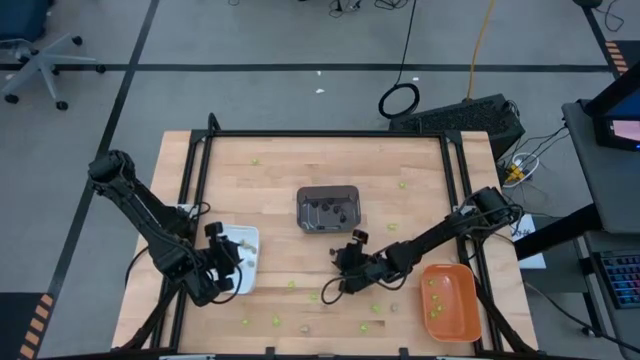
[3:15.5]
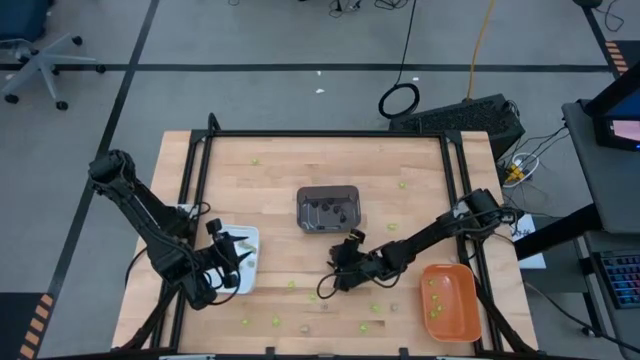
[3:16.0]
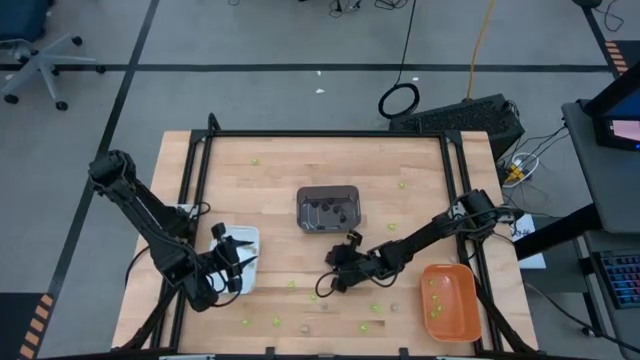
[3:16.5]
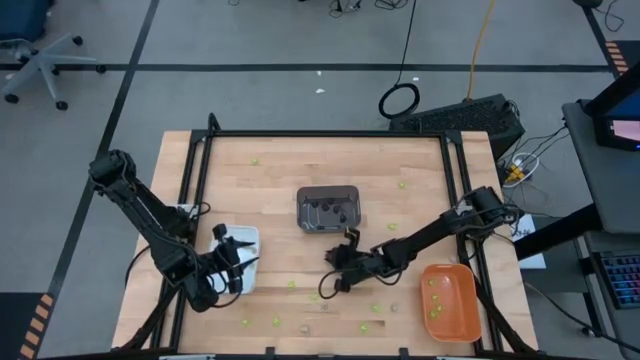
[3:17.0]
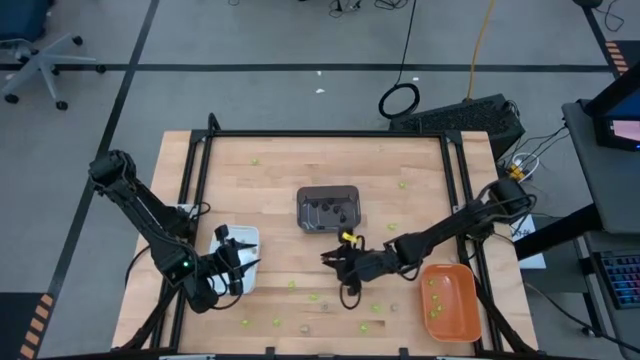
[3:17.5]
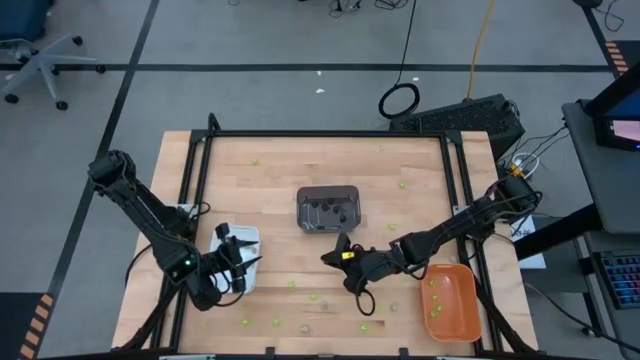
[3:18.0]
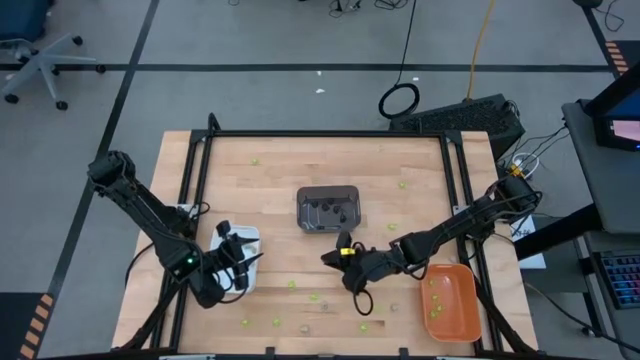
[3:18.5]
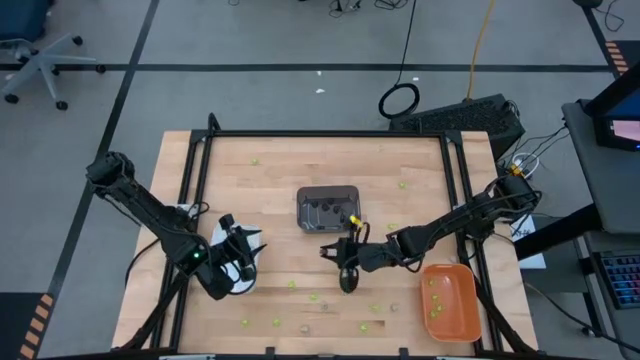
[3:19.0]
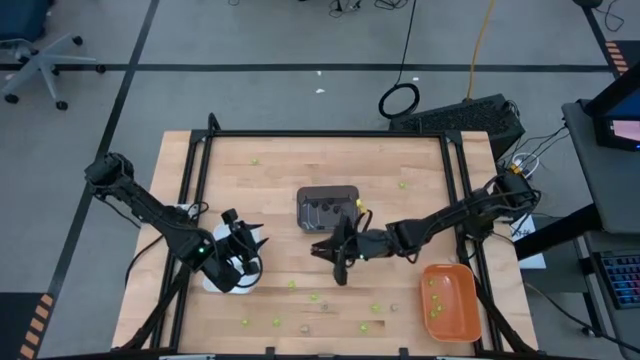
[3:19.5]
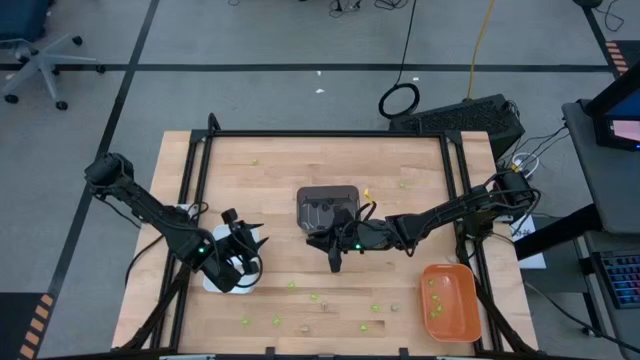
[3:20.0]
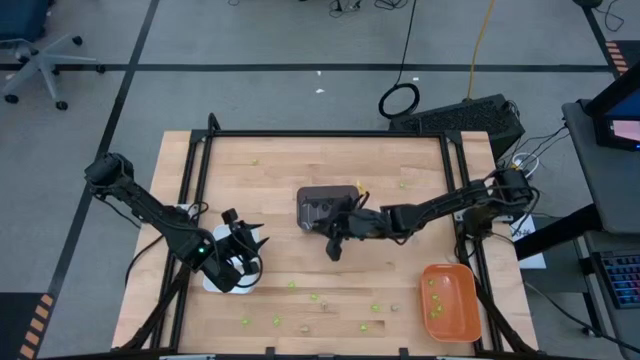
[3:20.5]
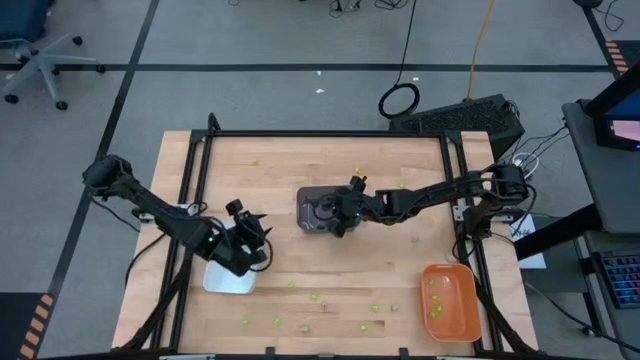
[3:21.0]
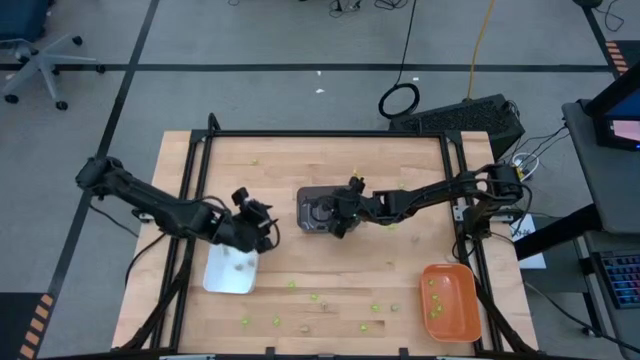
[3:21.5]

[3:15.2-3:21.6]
Task: Sort Halloween decoration
Put the black skull toy into the black bin

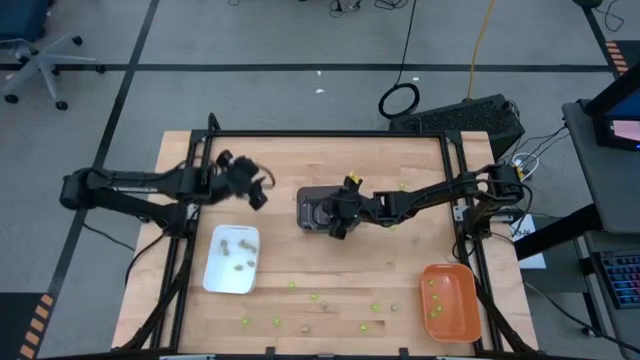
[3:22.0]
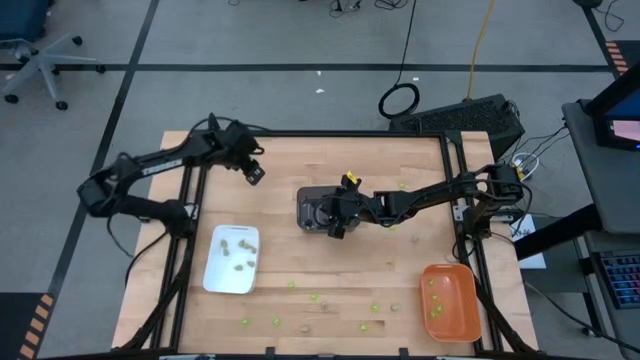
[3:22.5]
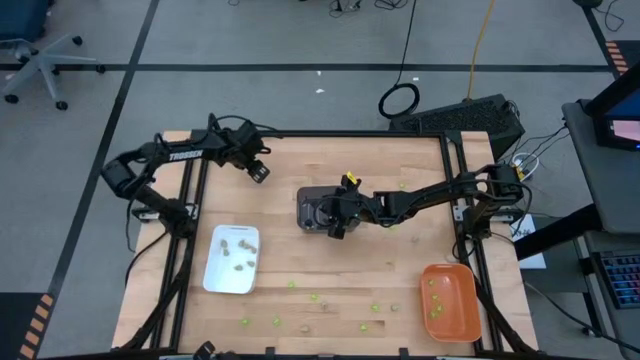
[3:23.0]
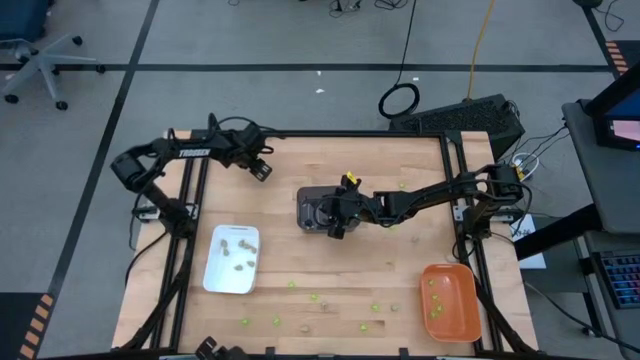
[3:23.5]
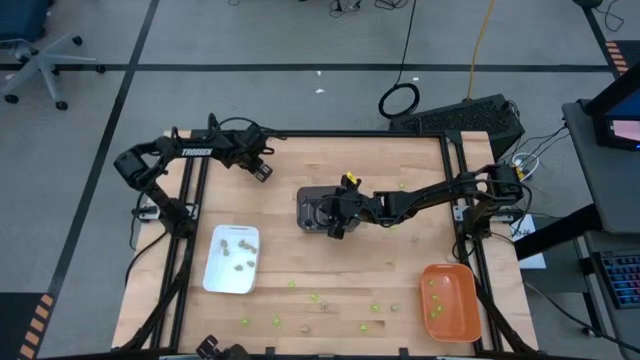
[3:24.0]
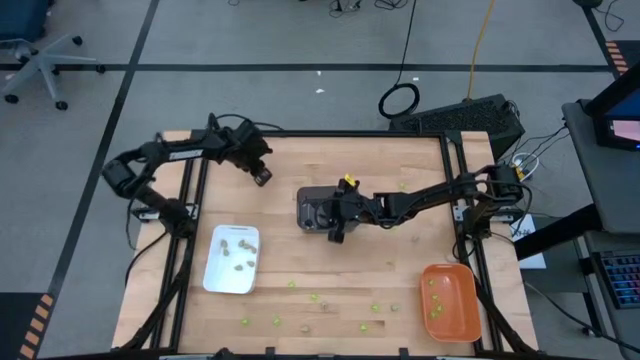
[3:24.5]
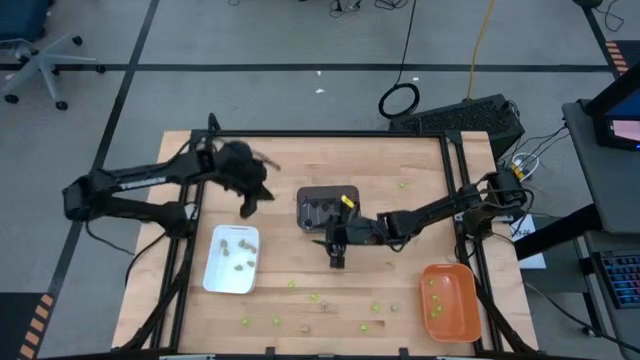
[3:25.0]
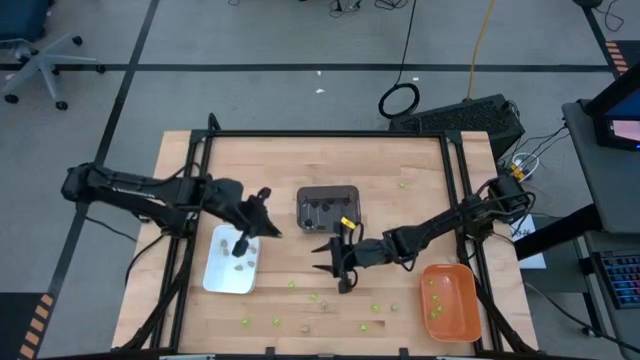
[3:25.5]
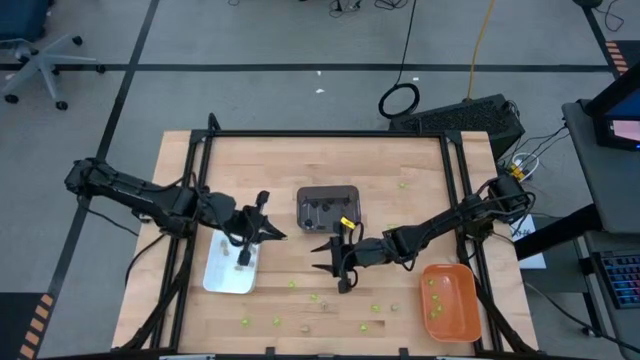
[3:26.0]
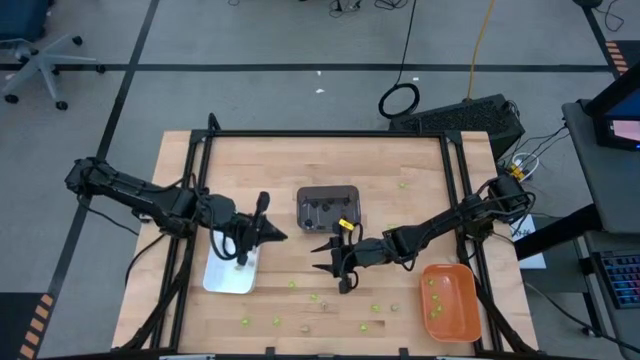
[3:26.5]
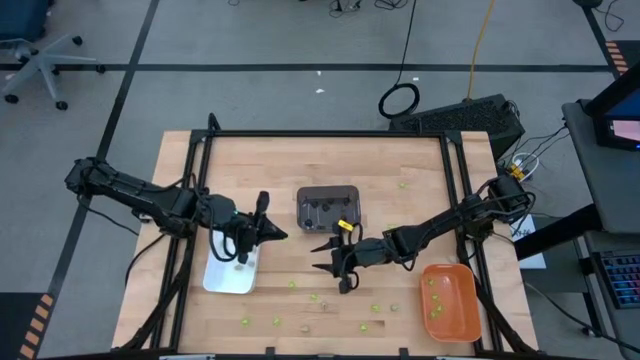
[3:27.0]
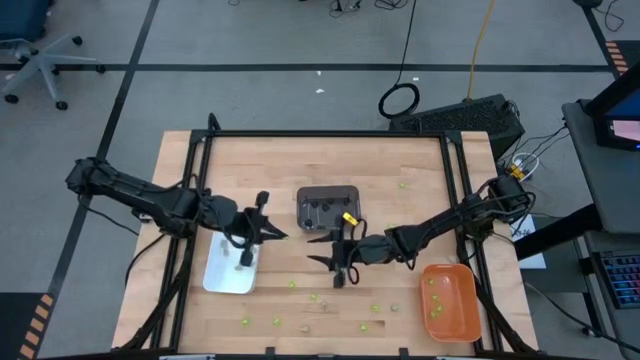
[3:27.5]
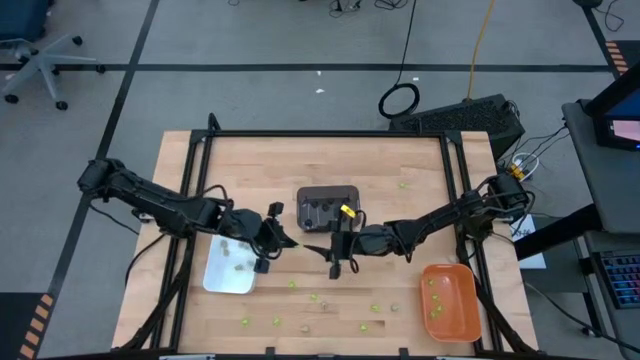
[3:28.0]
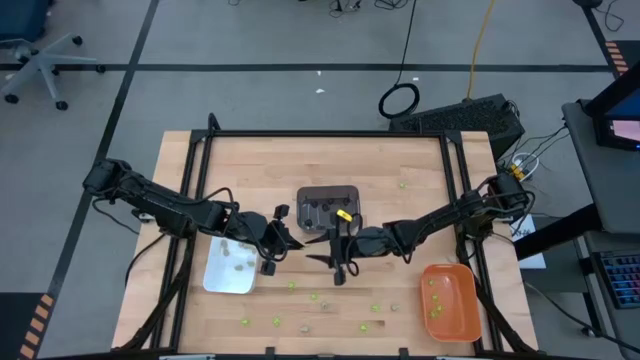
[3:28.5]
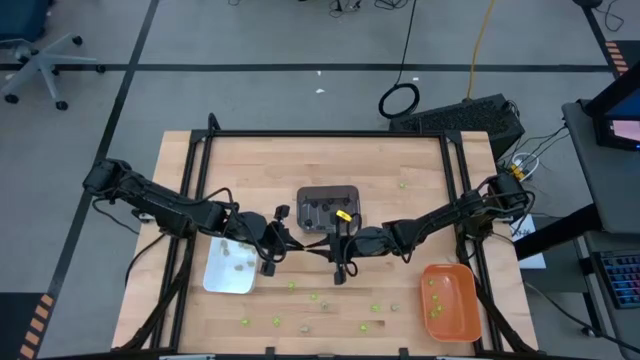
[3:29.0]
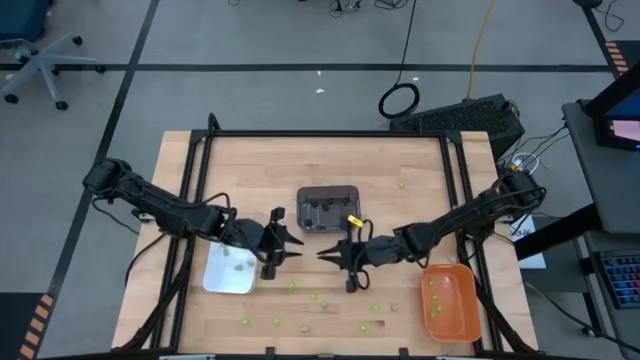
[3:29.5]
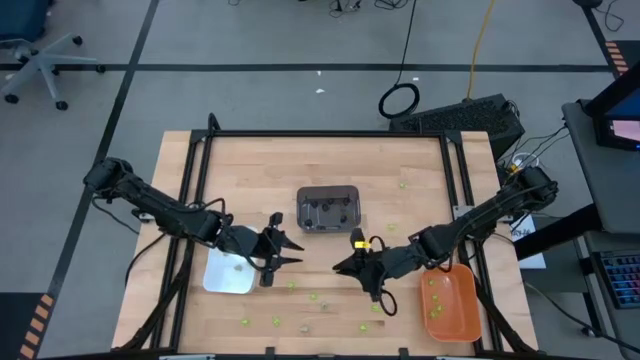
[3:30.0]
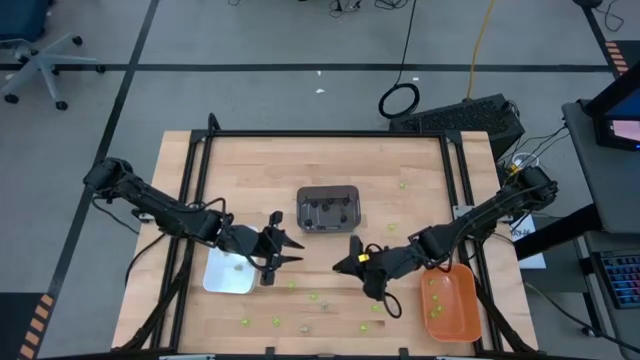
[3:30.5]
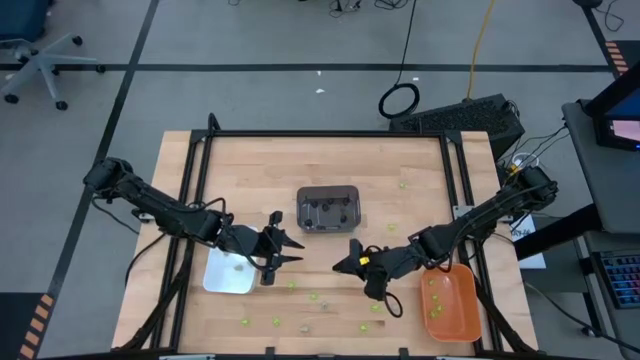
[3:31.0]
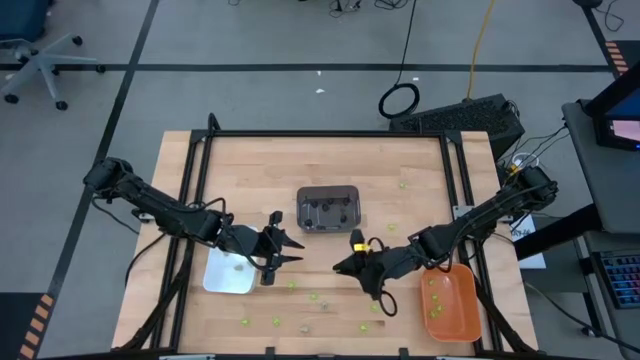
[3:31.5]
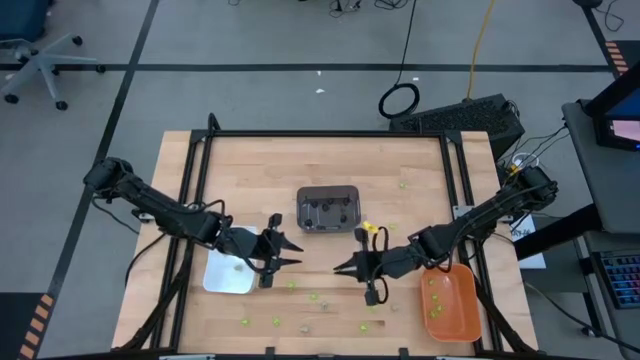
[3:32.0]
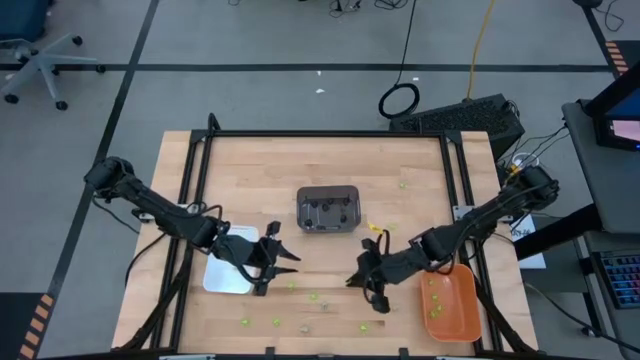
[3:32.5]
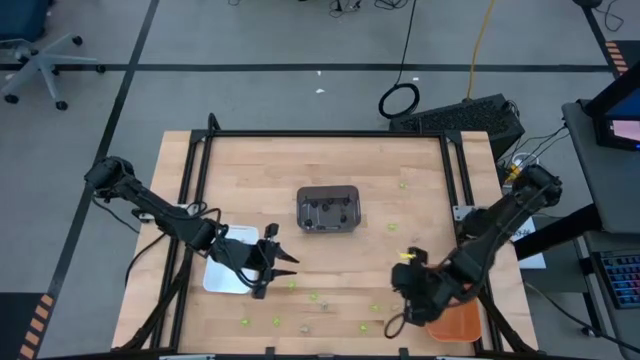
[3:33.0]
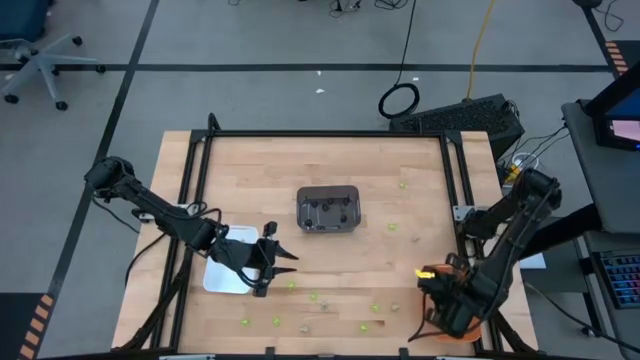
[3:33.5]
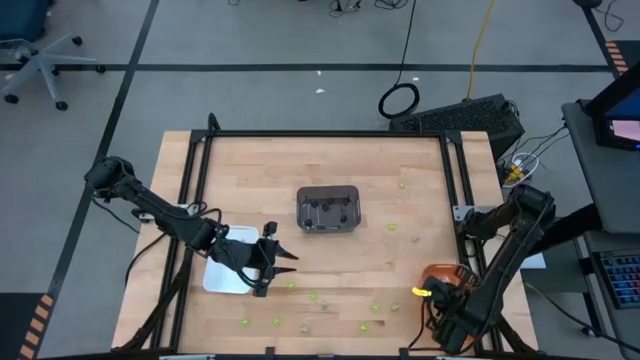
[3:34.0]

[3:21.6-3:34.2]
Put the green spider toy into the orange bin

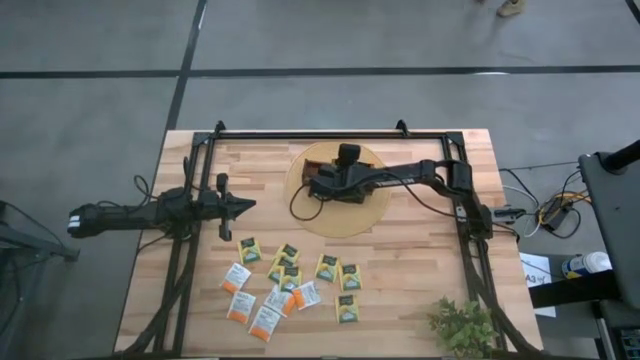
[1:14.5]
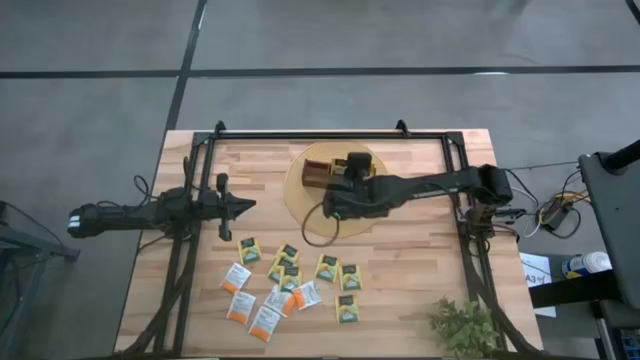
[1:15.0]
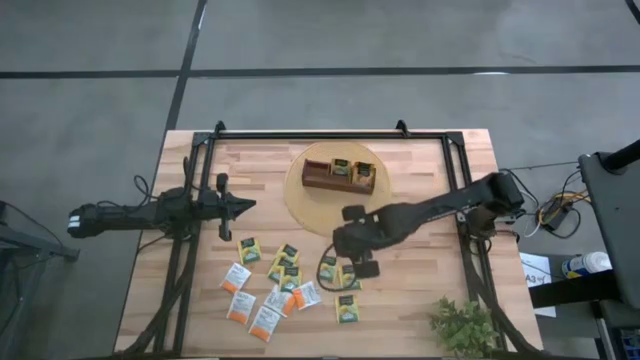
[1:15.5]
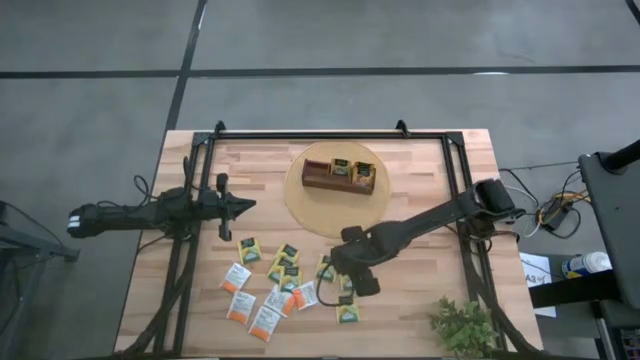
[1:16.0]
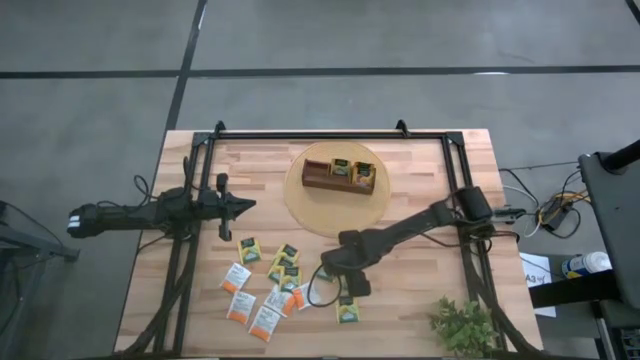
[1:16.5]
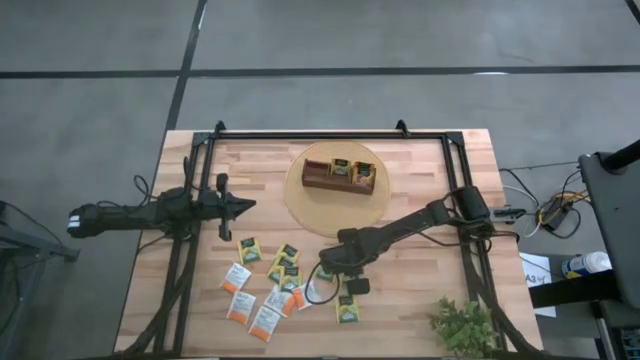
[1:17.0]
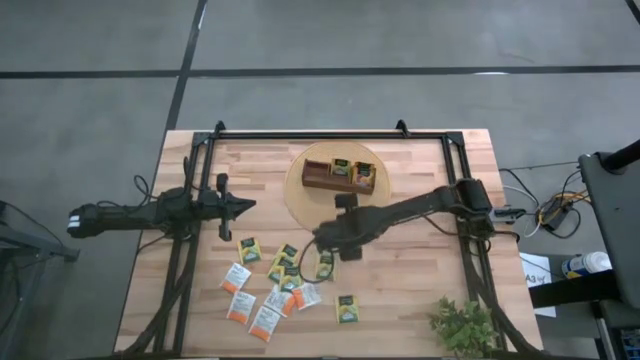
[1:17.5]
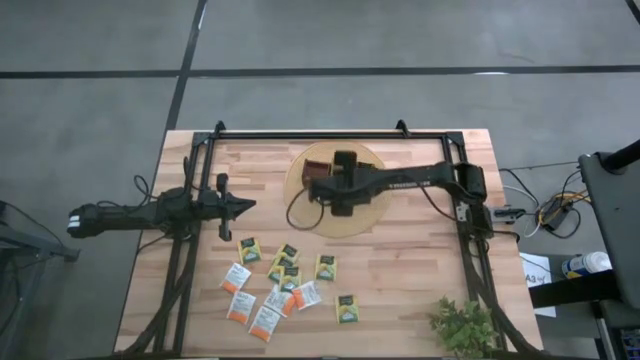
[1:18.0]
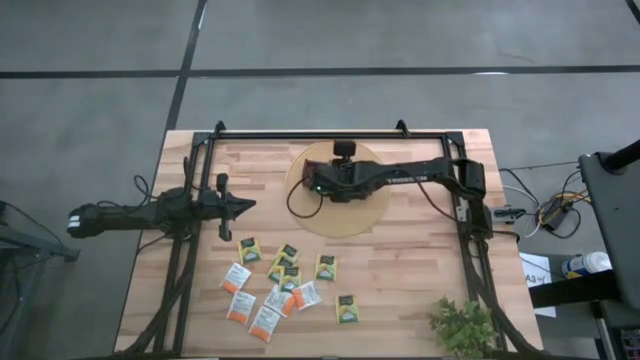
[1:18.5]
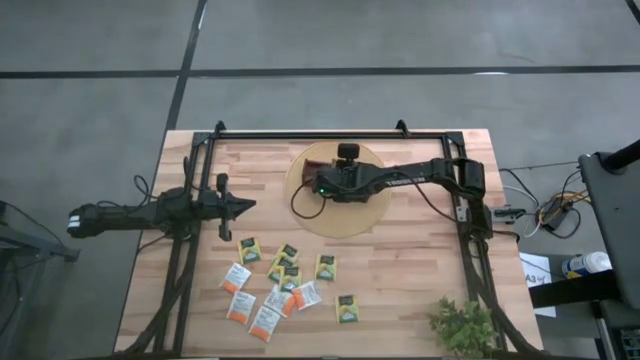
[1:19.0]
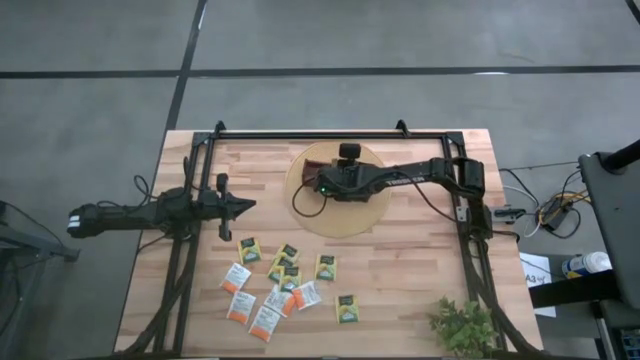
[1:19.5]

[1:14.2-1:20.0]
Task: Pick & Place Tea
Put the green tea bag into the middle section of wooden organizer
